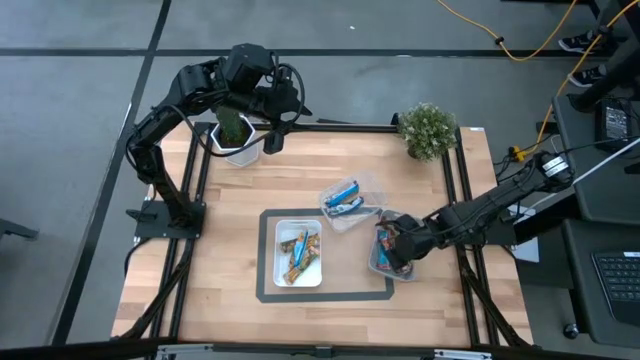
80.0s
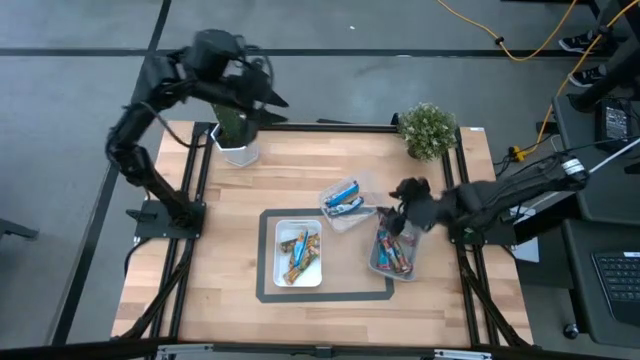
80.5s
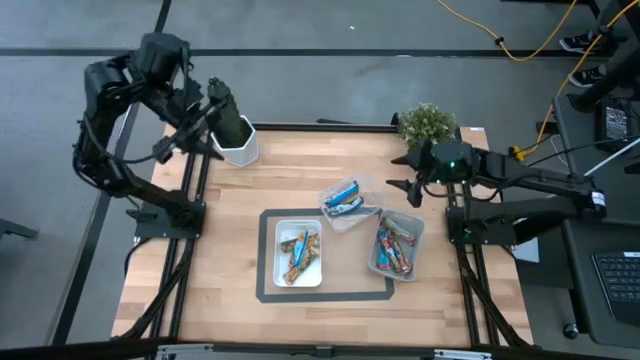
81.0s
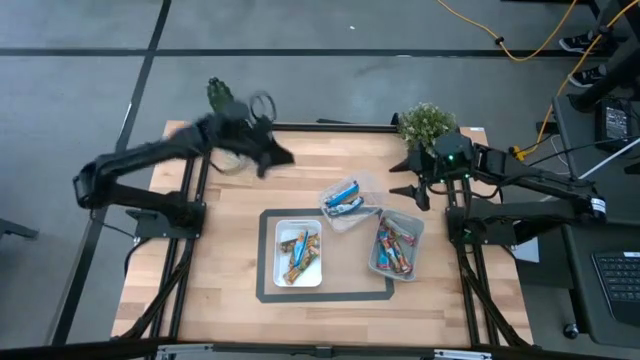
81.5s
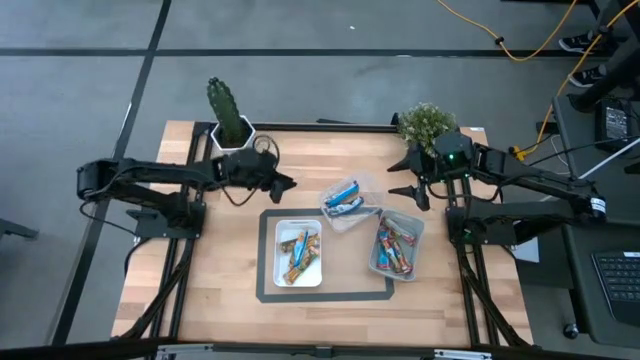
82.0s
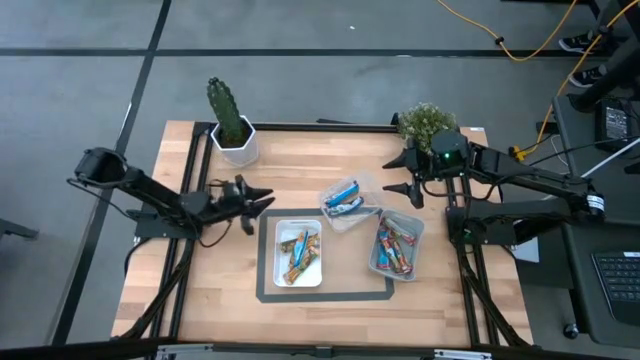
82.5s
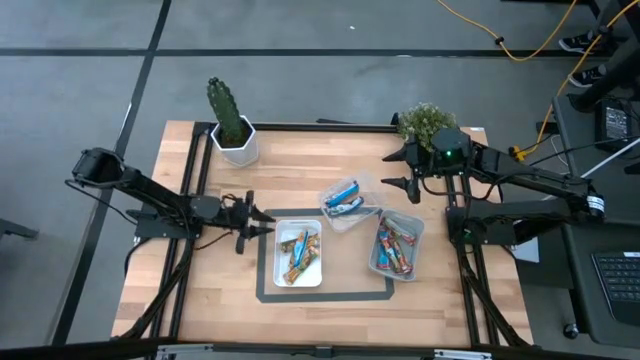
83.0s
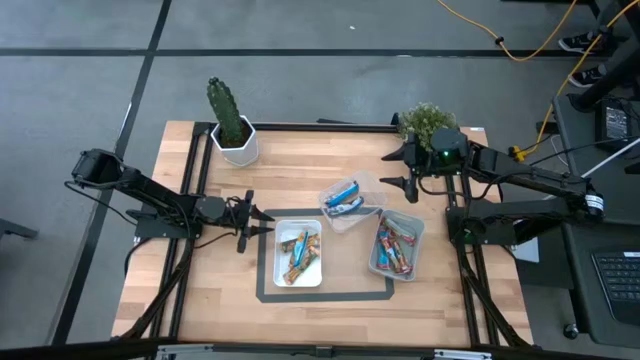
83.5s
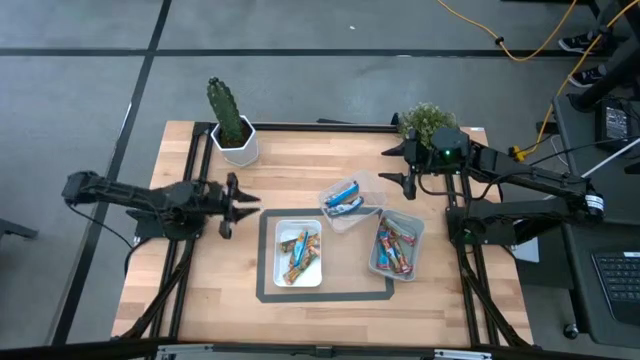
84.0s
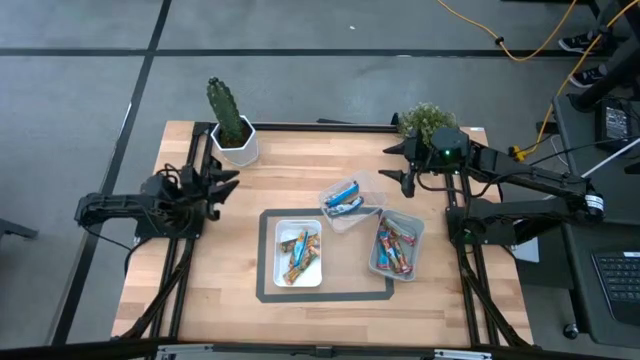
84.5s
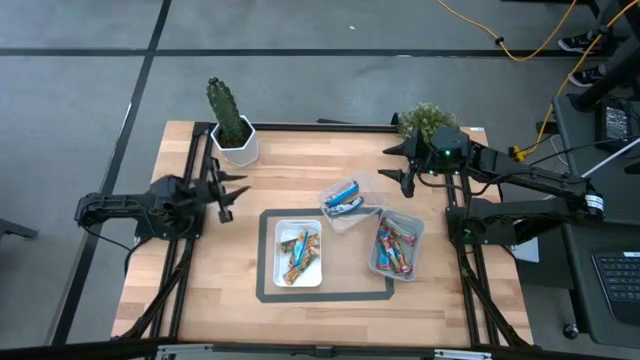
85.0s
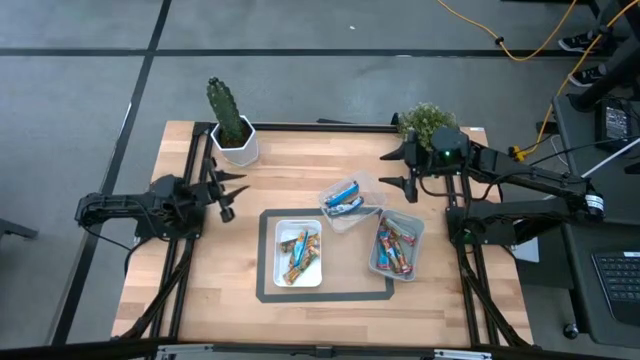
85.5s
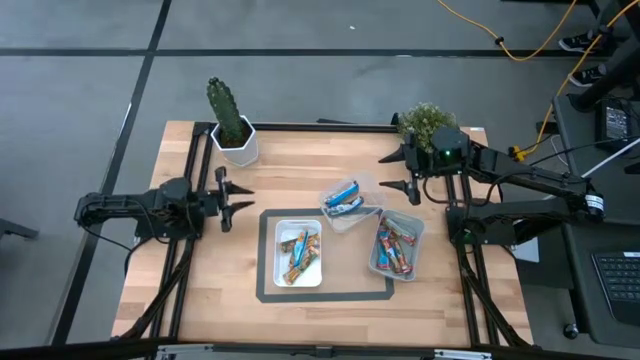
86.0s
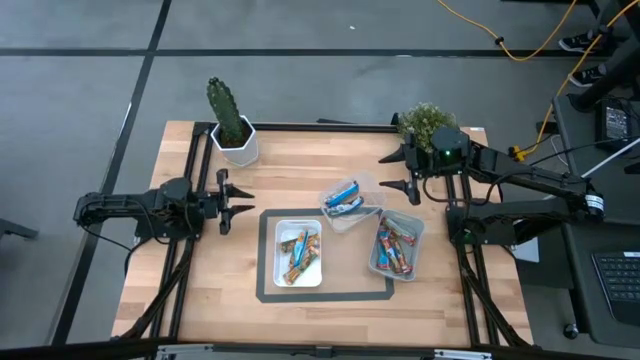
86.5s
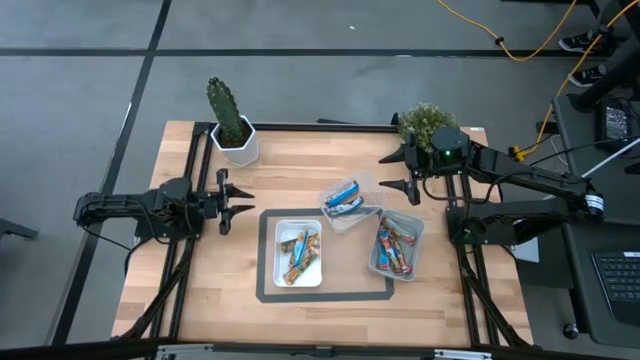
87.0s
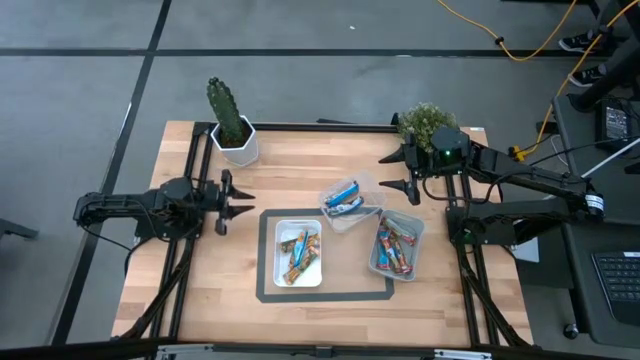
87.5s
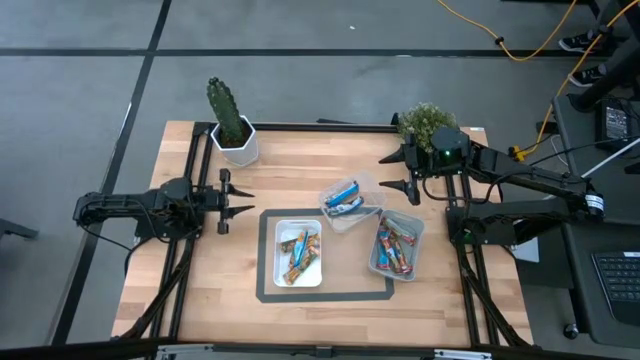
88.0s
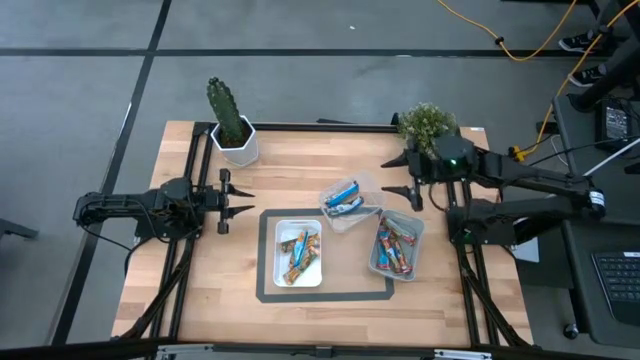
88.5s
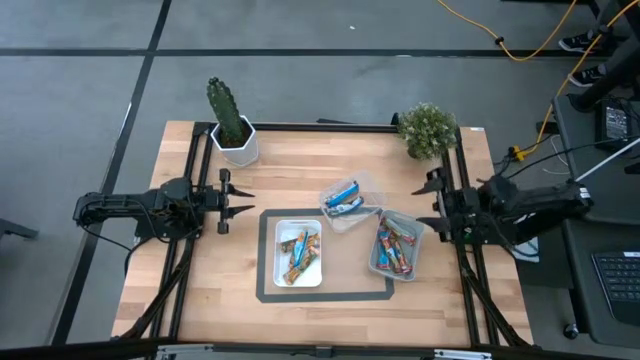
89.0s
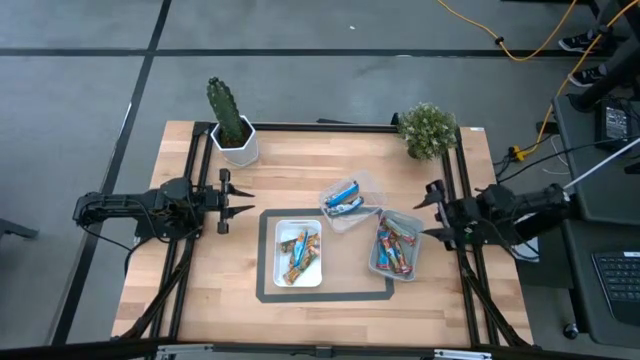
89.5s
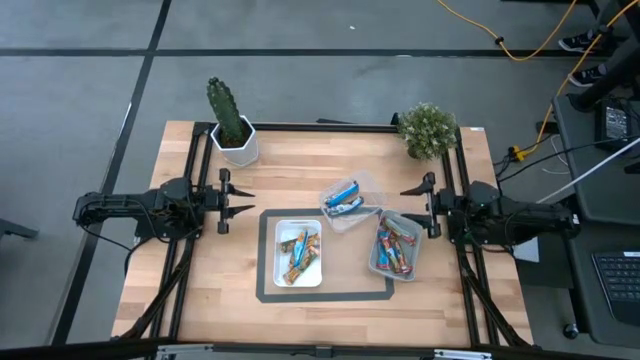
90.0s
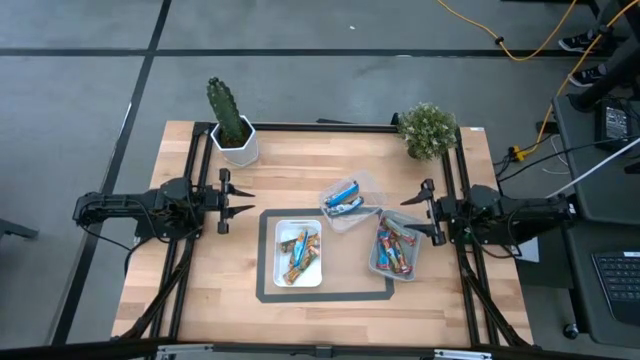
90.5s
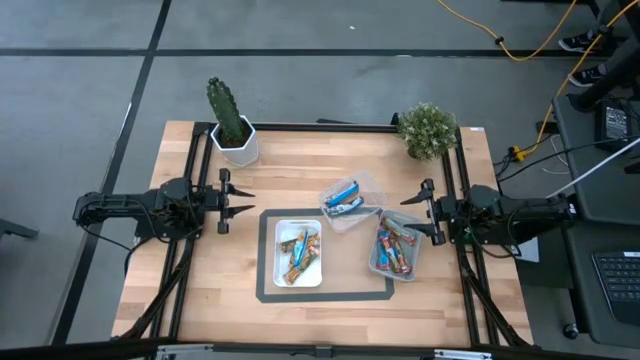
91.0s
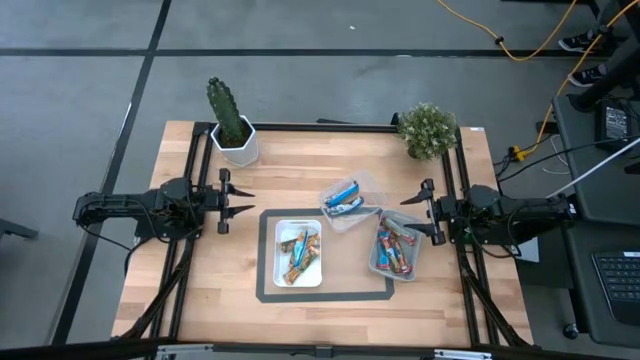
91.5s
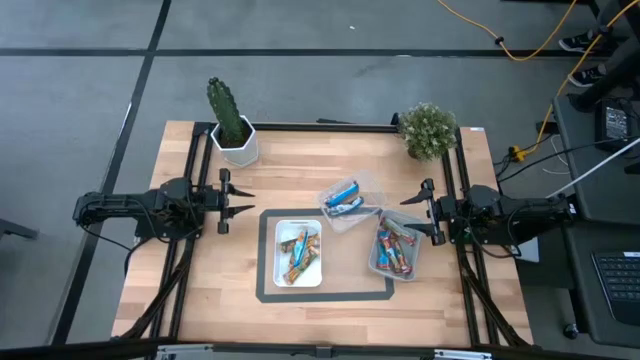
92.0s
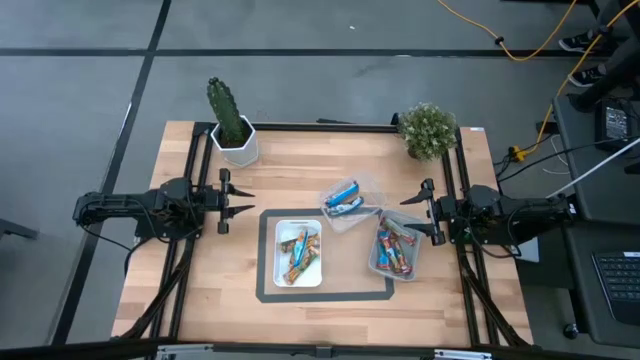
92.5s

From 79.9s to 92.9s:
Task: Pick and place Granola Bars by type
Return to Home Position

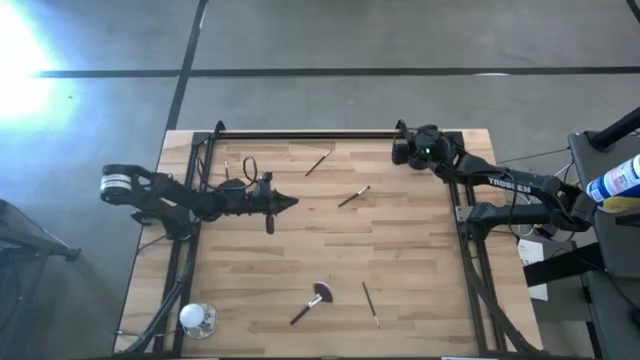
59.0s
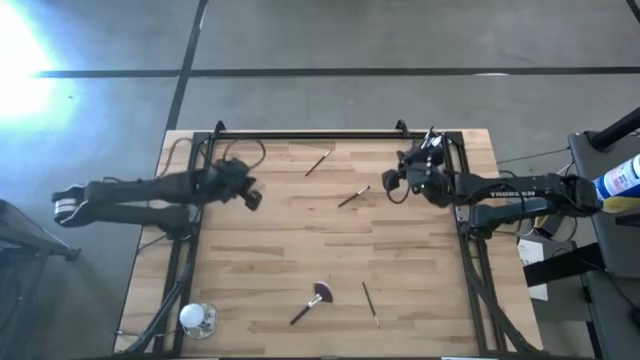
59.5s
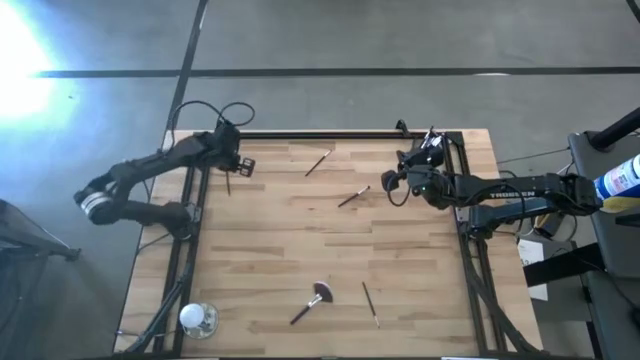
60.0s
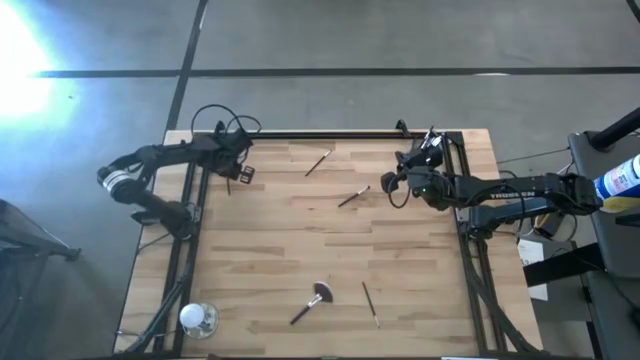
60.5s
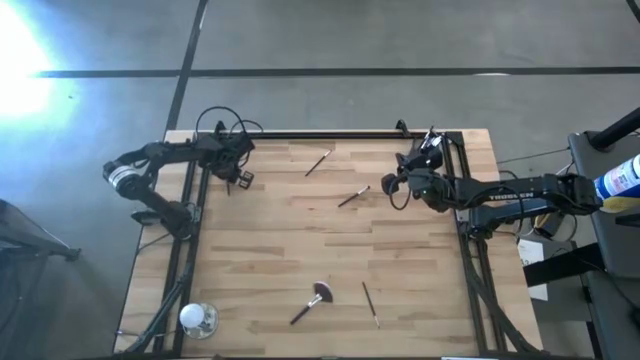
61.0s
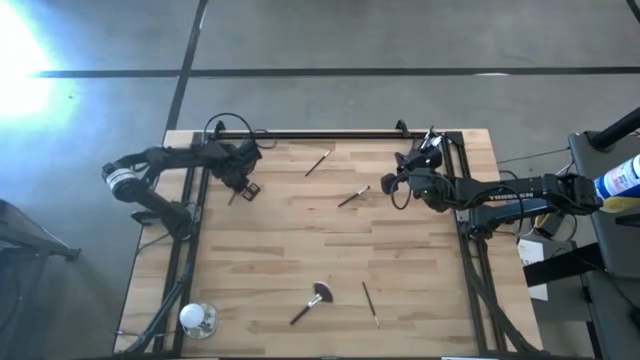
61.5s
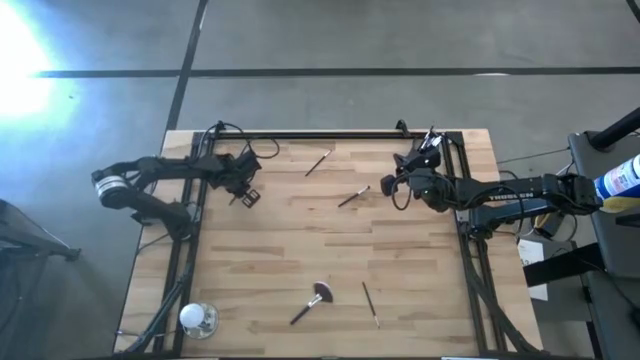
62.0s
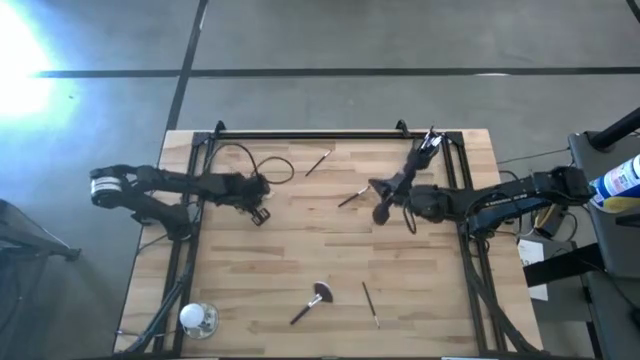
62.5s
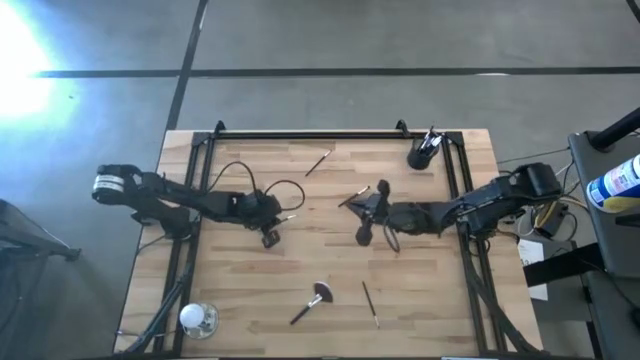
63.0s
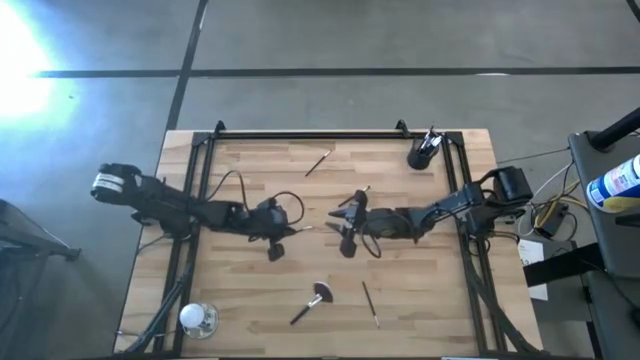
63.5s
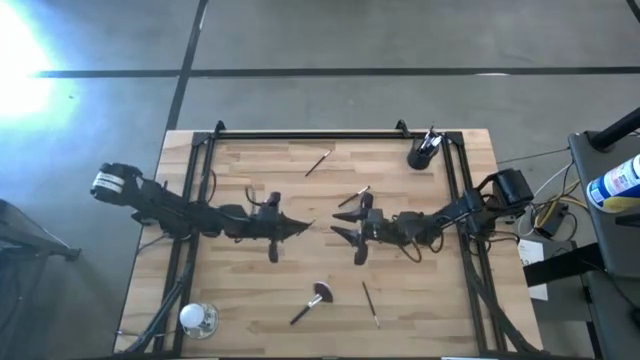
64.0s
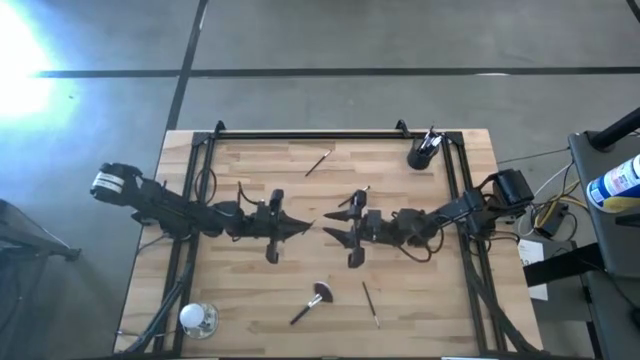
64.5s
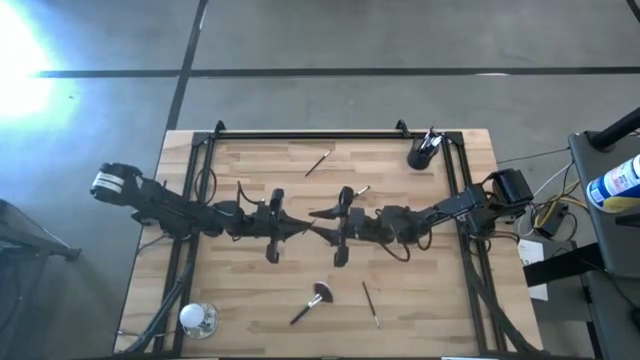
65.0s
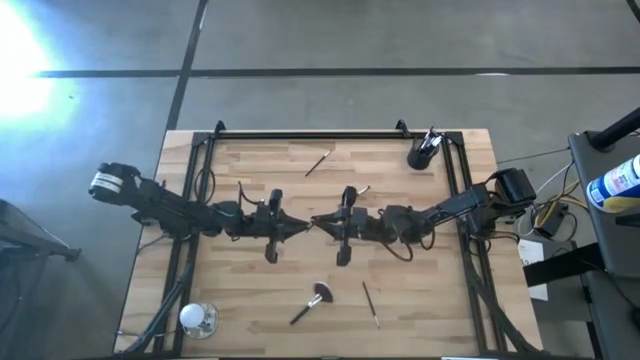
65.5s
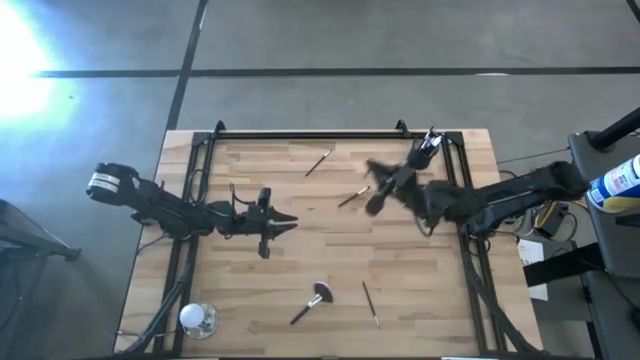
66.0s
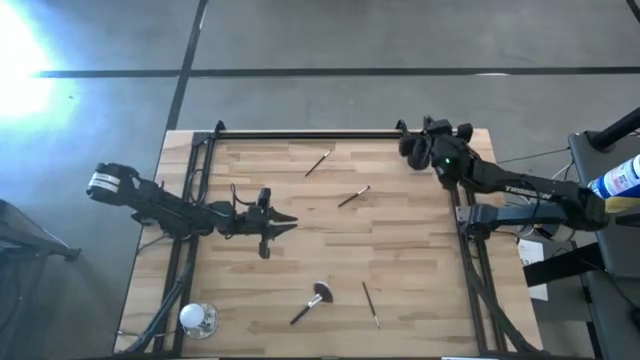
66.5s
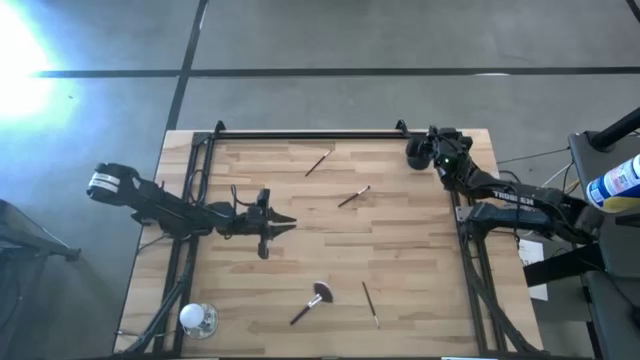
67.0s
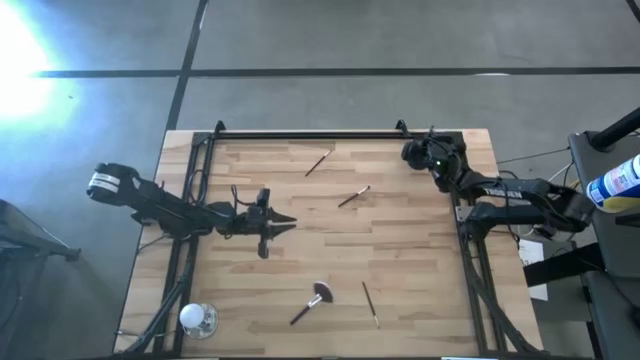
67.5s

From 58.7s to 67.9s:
Task: Put items in baskets/containers
Put the eyeshadow brush into the pen holder
